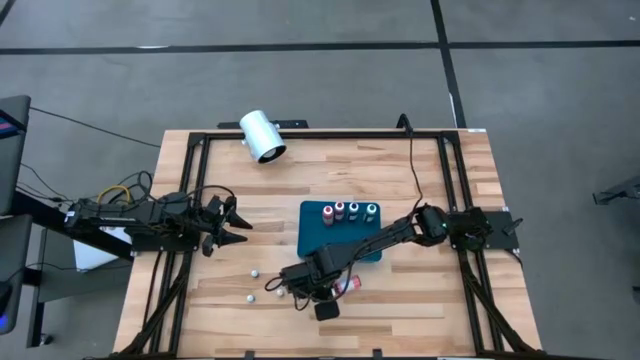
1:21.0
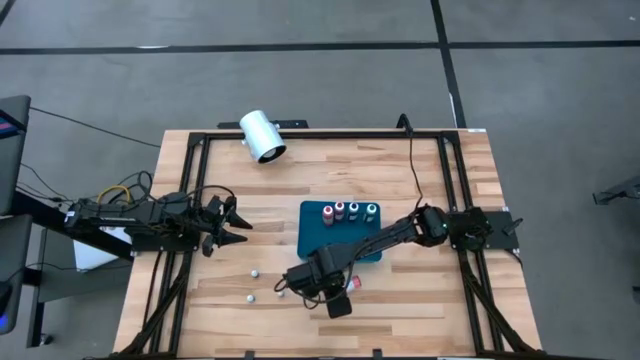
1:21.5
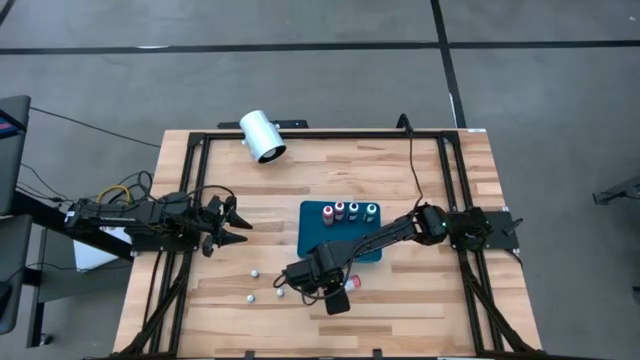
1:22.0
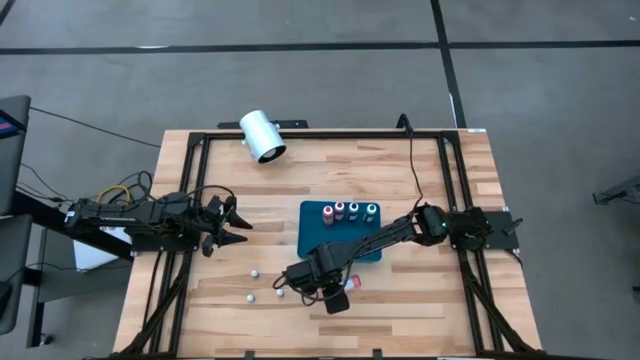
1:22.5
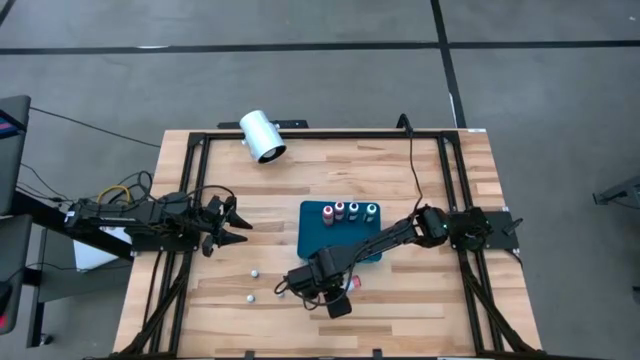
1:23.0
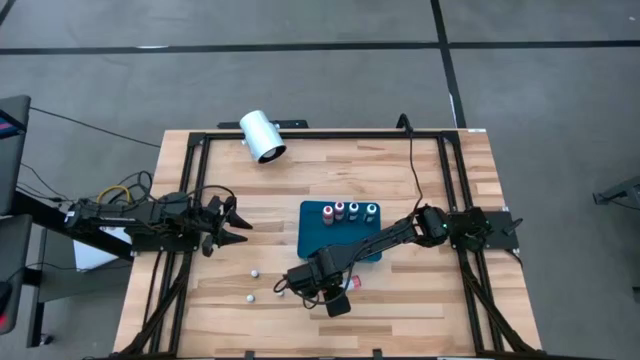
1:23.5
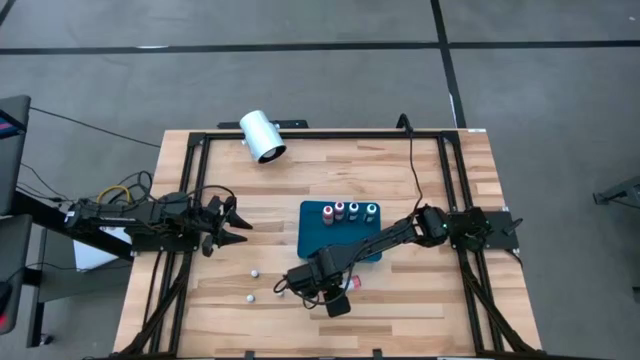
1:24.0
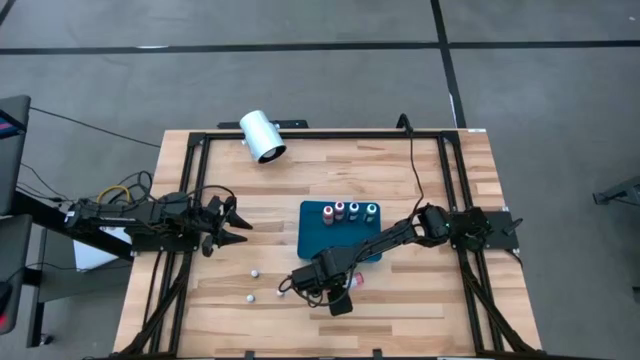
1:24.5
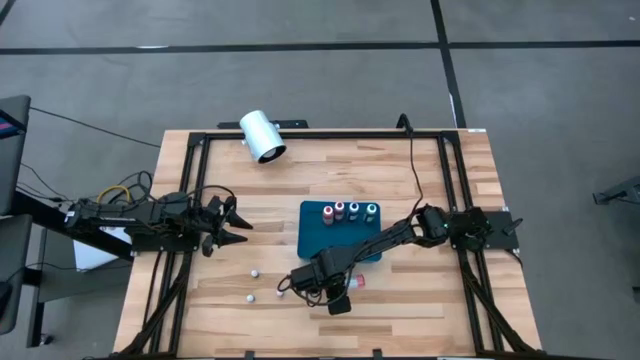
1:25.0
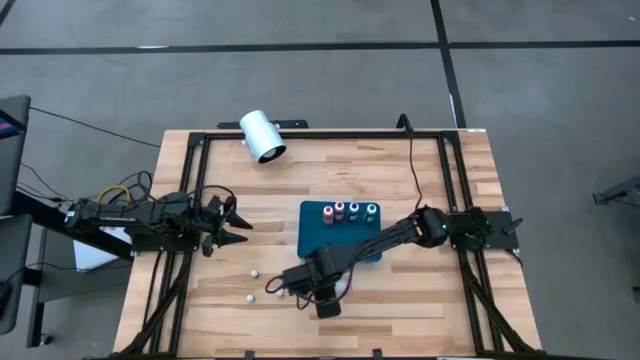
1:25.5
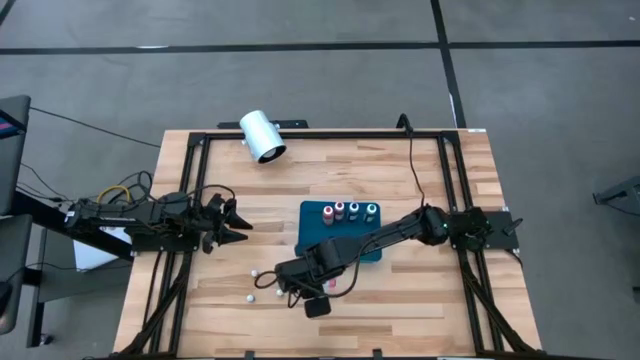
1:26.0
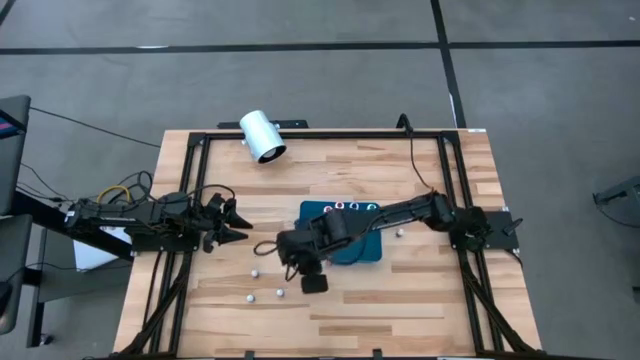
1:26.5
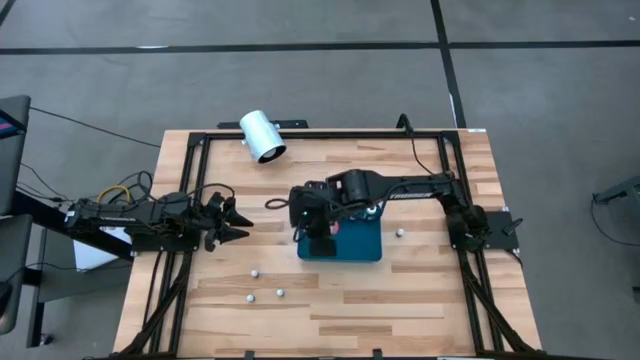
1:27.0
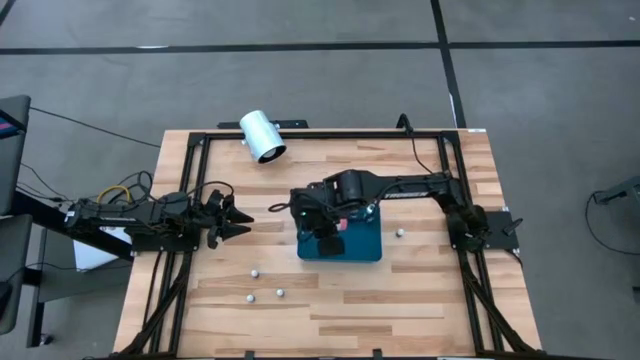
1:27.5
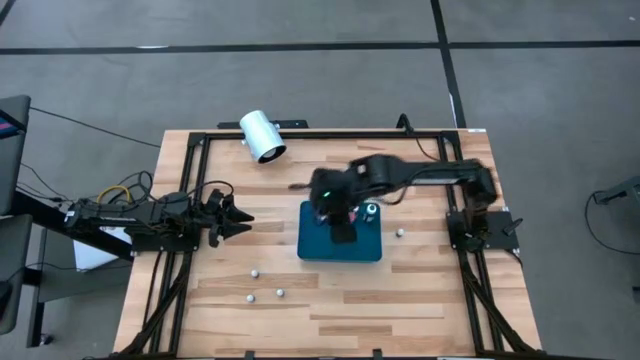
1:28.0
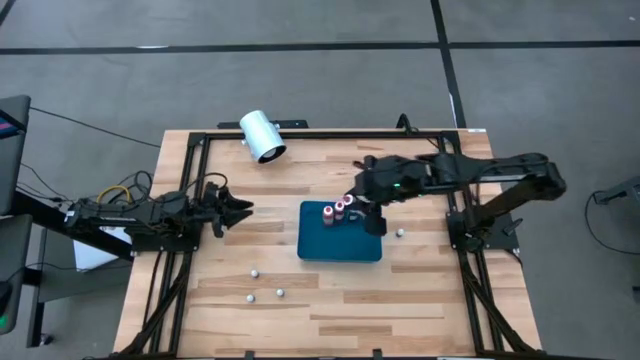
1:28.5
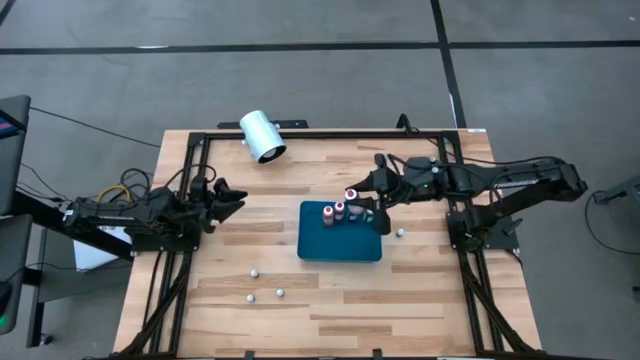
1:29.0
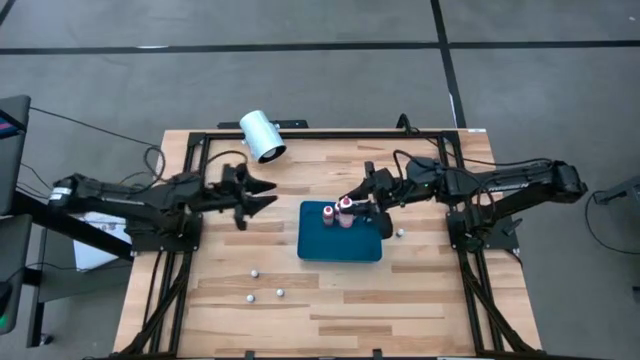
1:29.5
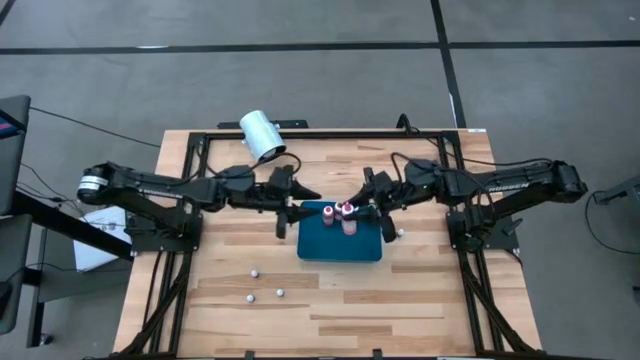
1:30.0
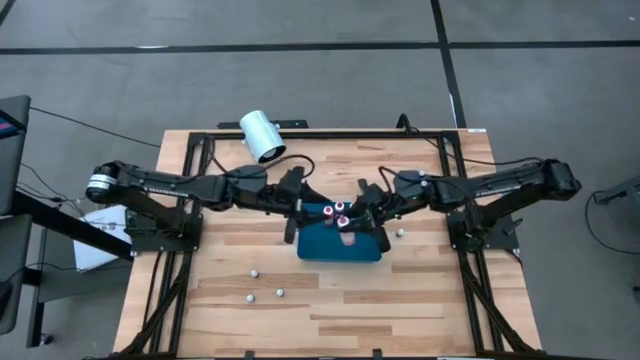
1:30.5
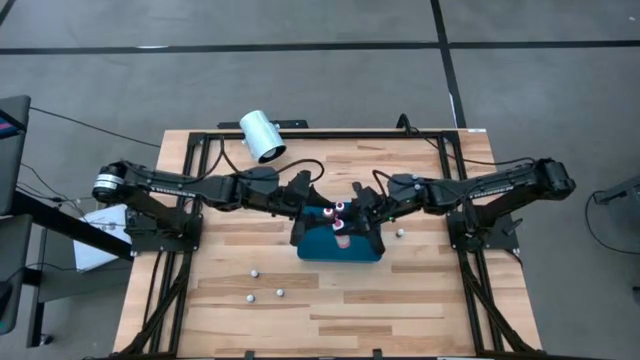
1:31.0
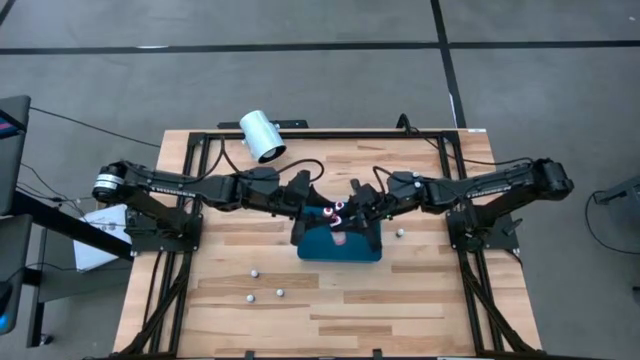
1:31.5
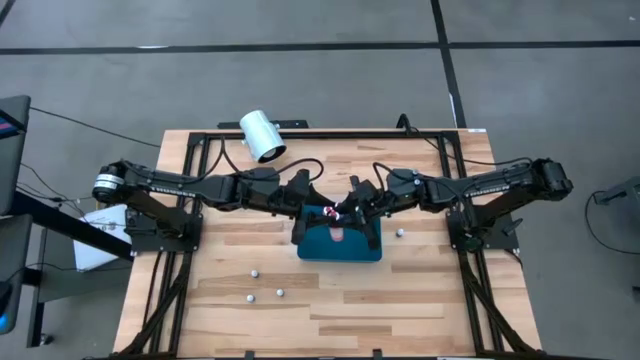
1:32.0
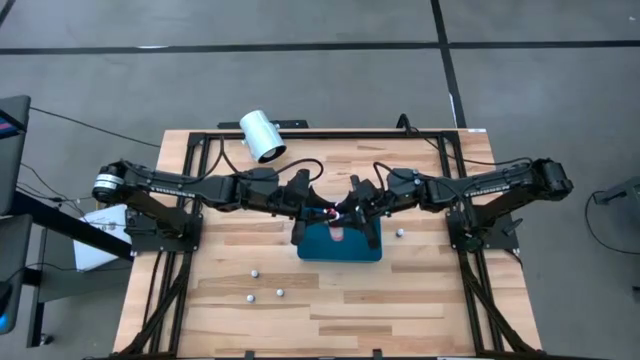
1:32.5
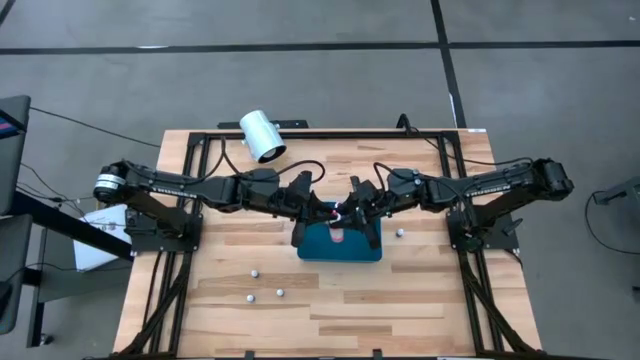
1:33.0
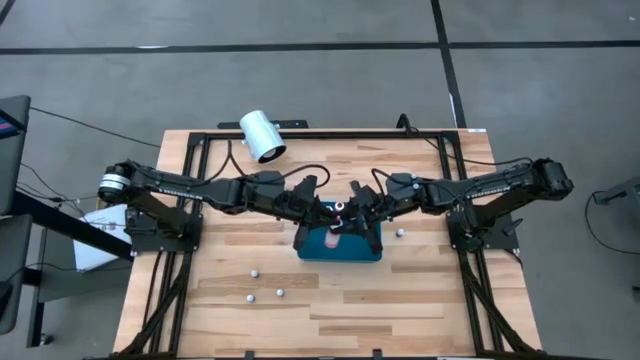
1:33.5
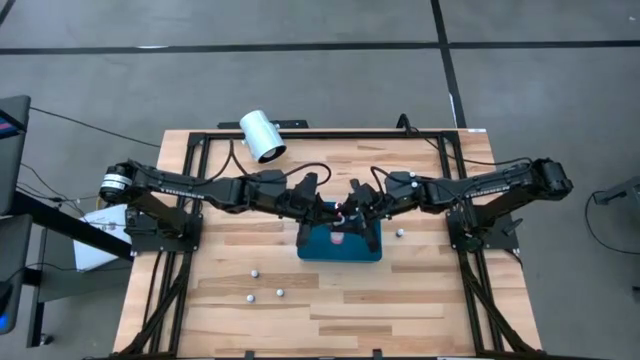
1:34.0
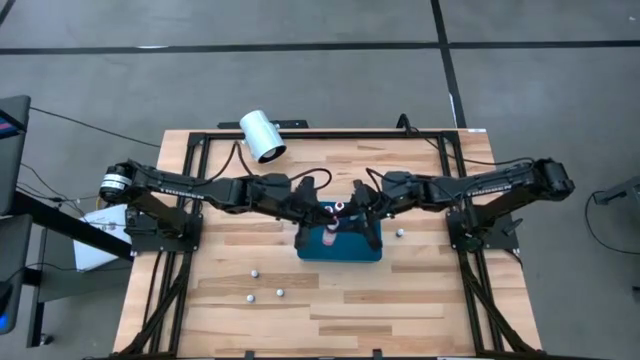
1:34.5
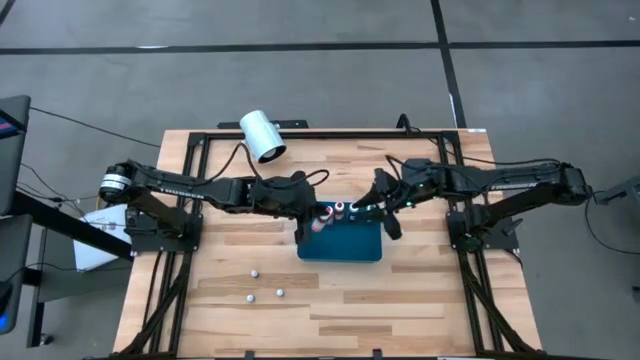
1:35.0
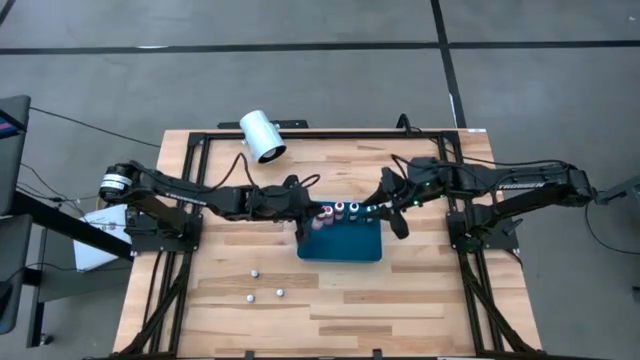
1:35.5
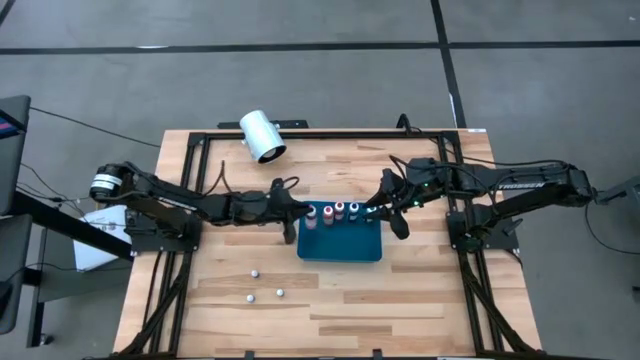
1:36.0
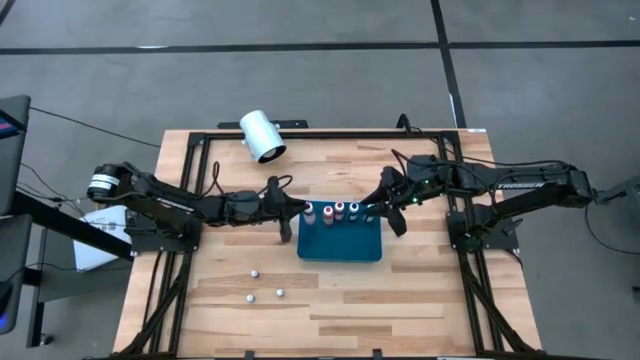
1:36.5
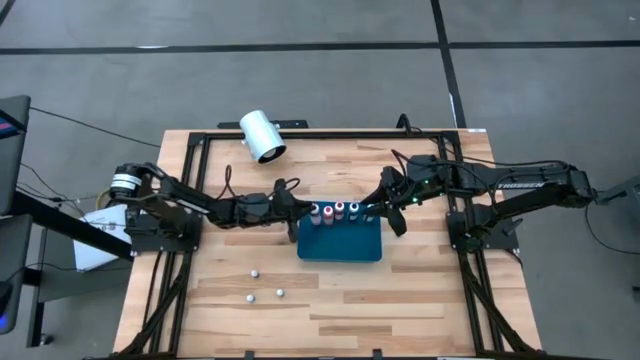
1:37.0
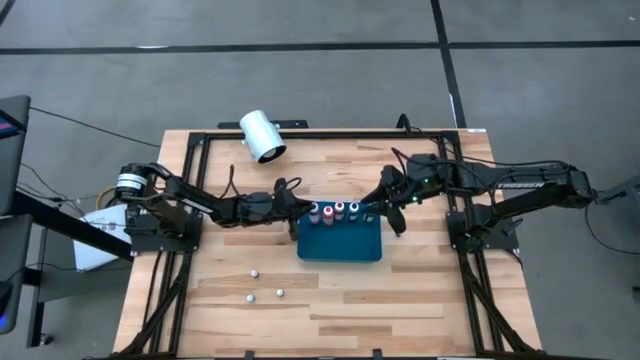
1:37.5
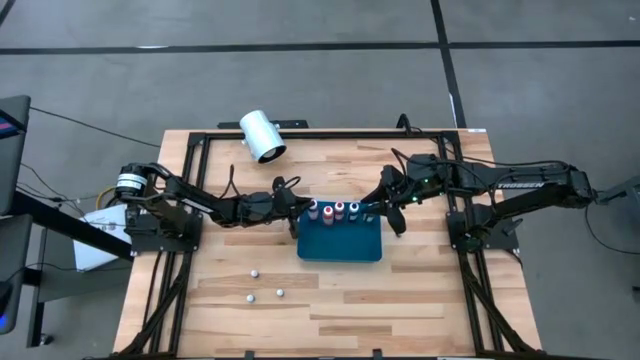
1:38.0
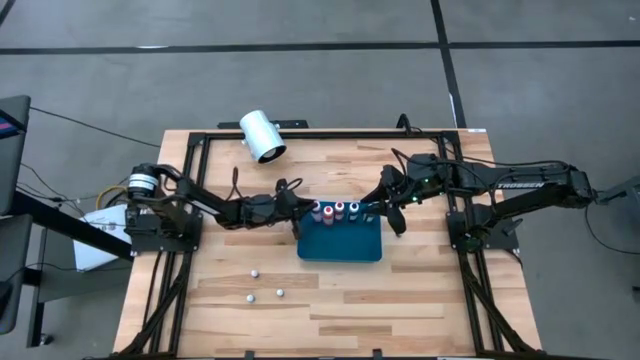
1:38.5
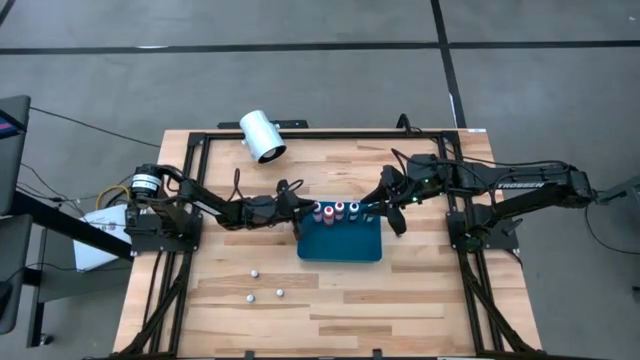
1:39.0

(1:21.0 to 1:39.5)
Task: Pick & Place food coloring
Put the large pink food coloring bottle into the blue bin

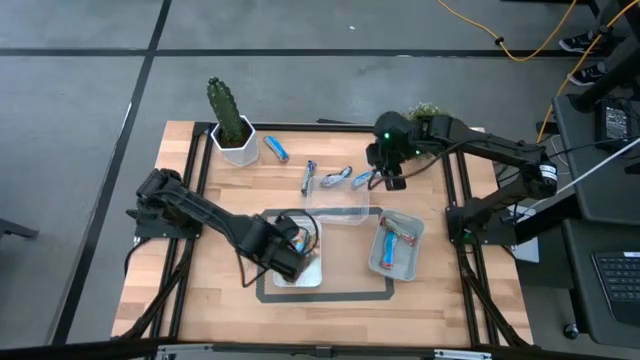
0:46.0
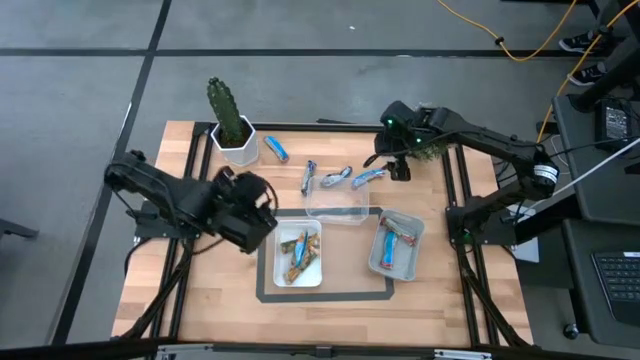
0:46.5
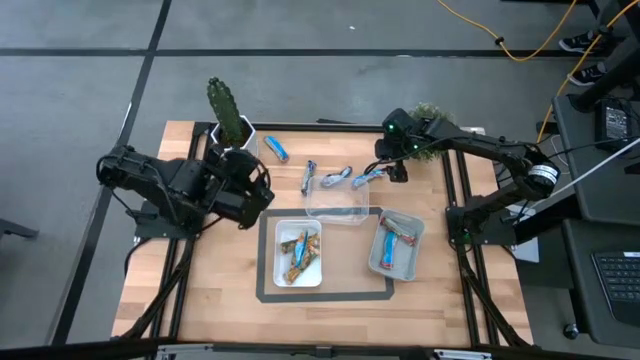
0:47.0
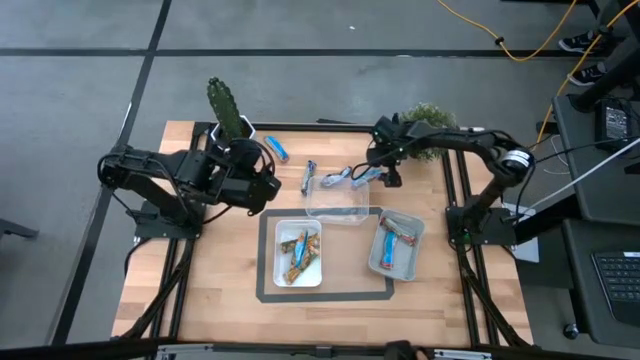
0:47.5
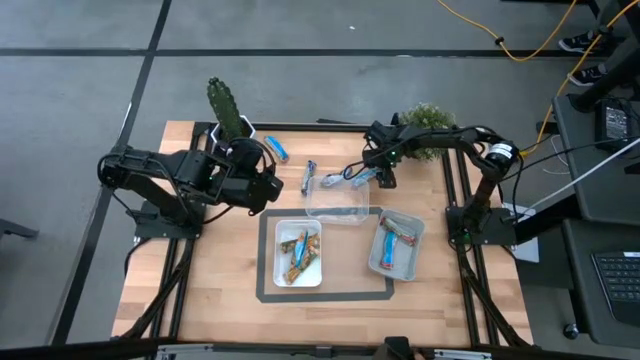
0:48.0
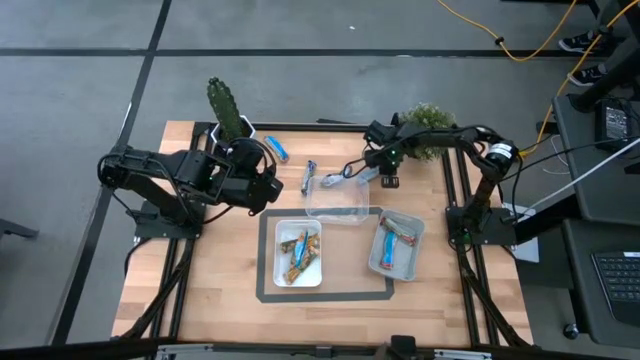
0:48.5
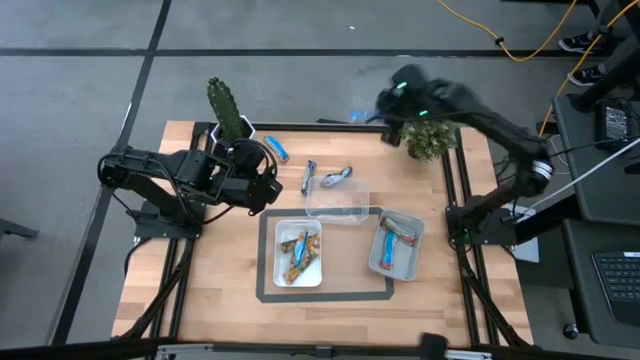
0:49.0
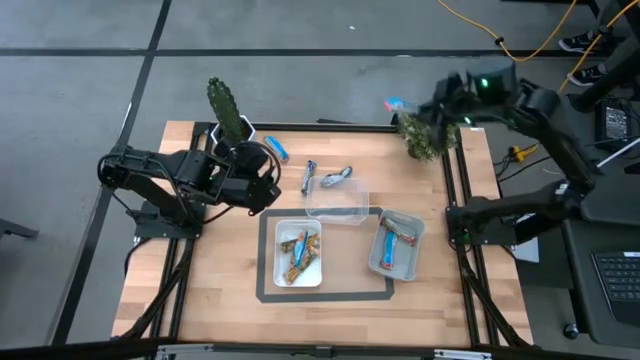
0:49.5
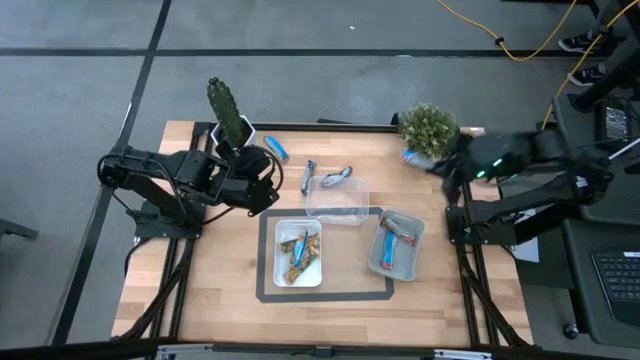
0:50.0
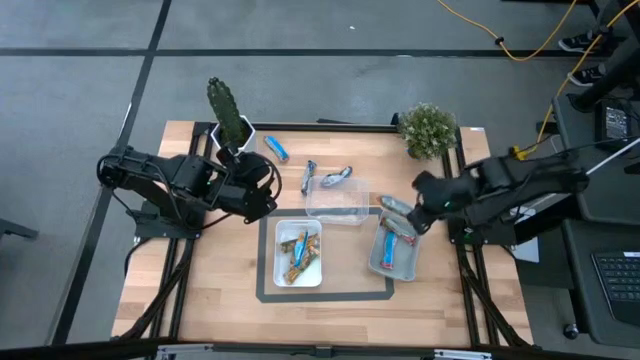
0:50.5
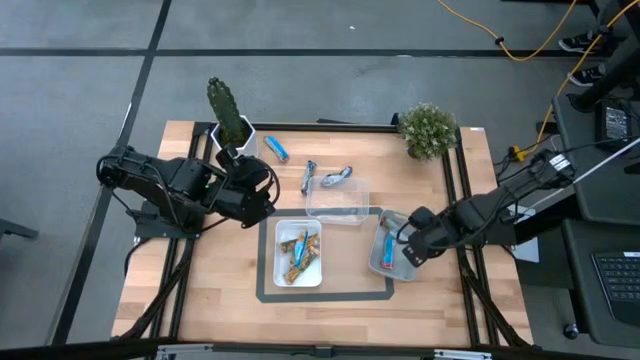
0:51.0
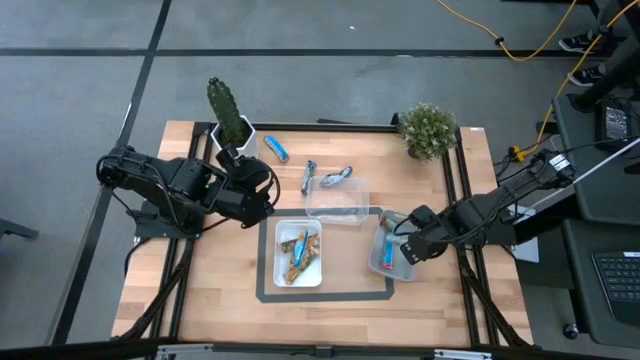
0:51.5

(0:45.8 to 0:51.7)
Task: Pick and place Granola Bars by type
Put the red granola bar into the gray bin
